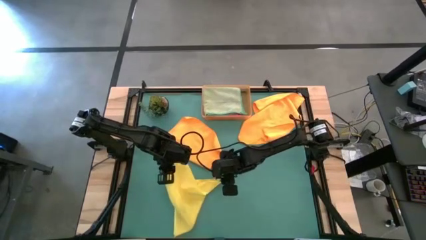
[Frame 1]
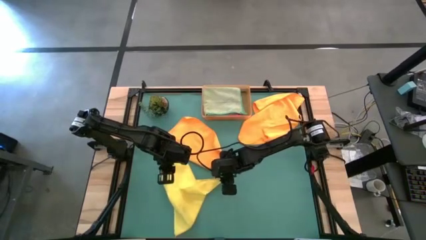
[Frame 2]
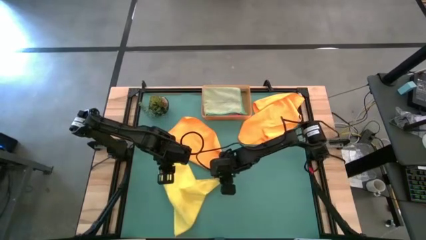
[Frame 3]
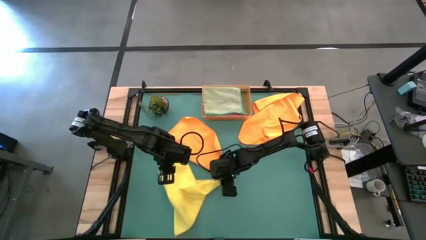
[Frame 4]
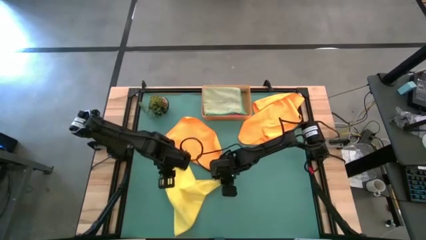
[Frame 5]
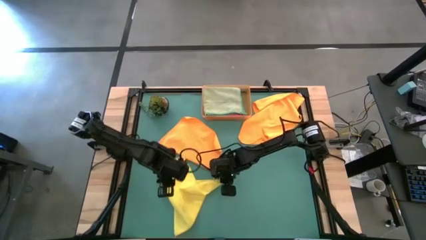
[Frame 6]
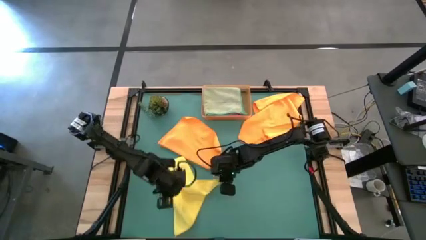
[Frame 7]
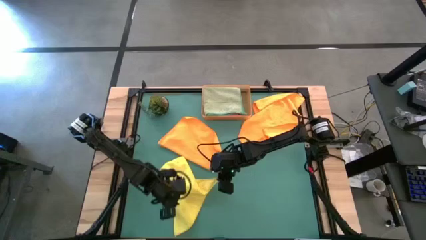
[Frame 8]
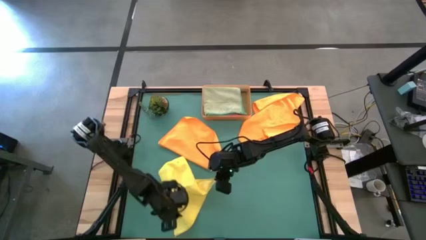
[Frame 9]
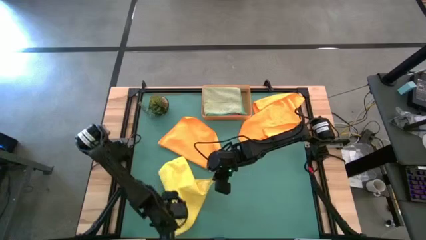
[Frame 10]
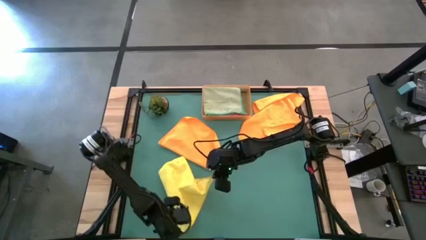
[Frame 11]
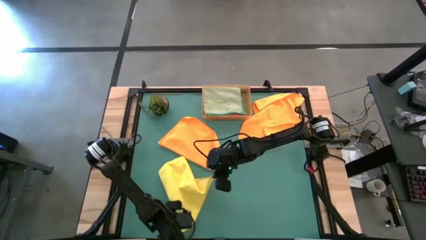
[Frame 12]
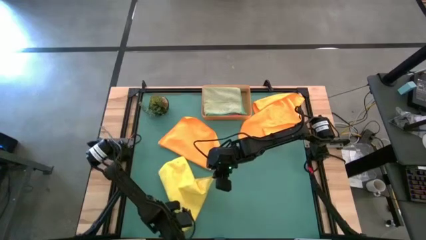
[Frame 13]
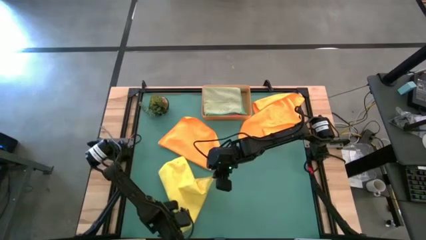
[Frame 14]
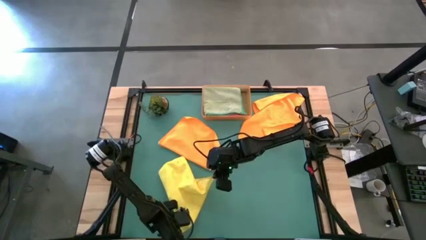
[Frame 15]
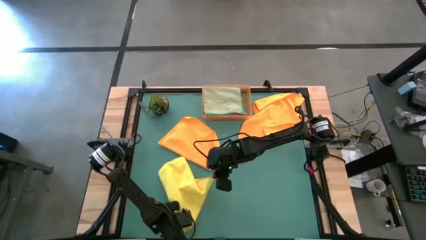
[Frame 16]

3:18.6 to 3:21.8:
Task: Fold microfiber towels
Fold the yellow microfiber towel

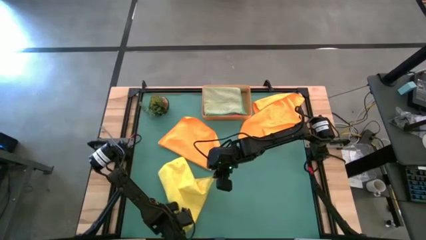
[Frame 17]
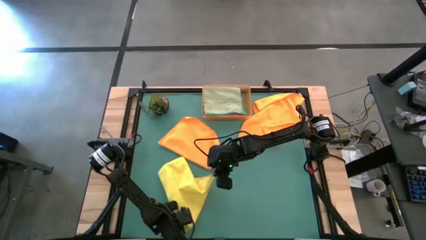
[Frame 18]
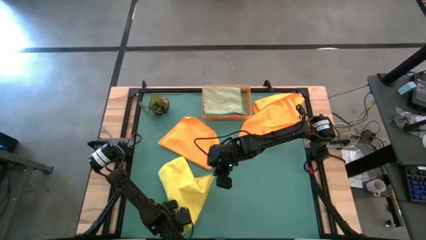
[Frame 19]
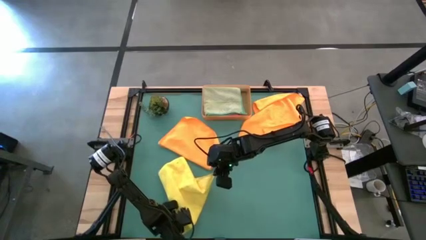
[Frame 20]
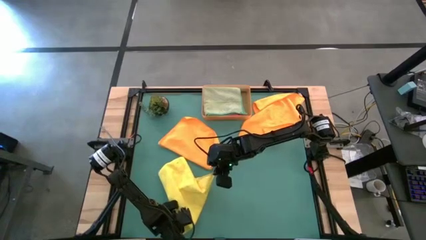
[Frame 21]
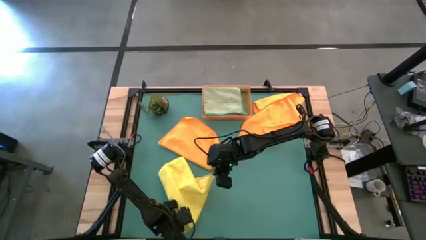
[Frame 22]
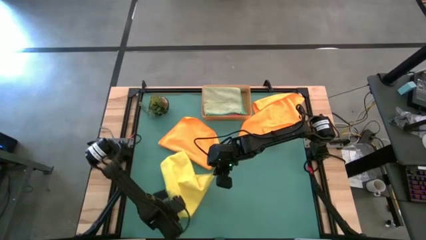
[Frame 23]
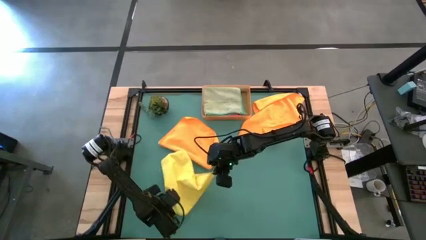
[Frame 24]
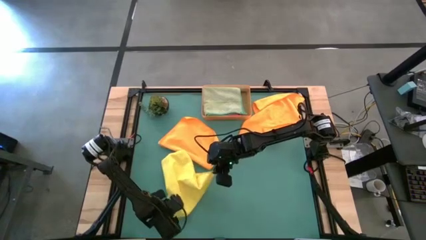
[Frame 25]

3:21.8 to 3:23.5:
Fold the yellow microfiber towel

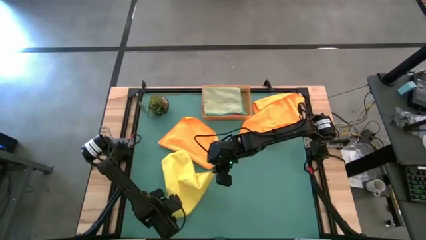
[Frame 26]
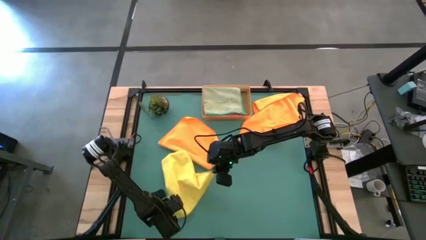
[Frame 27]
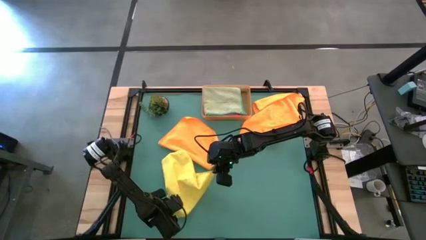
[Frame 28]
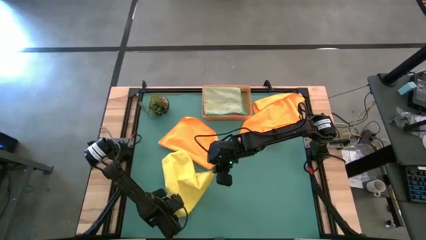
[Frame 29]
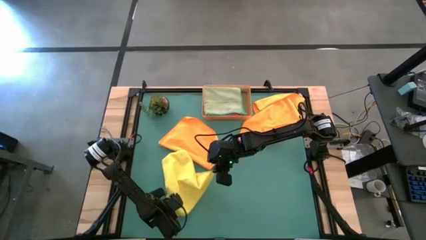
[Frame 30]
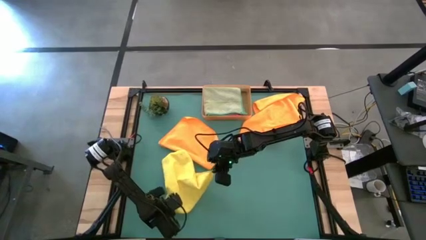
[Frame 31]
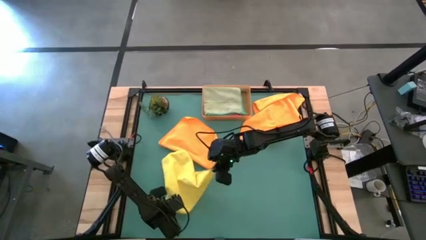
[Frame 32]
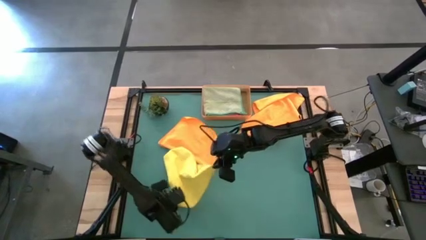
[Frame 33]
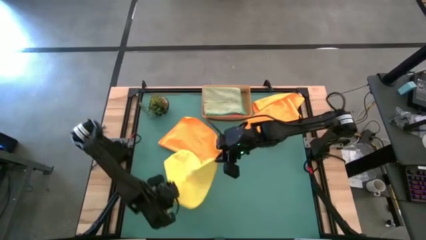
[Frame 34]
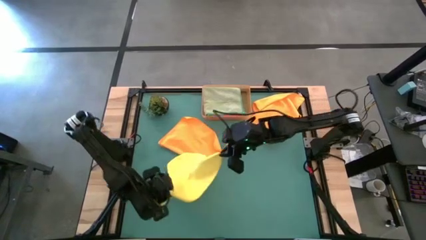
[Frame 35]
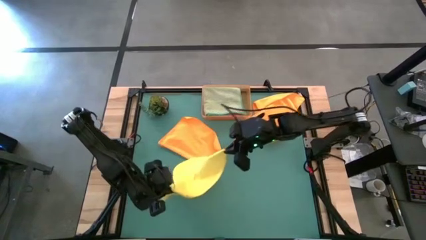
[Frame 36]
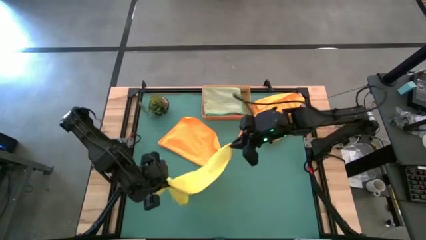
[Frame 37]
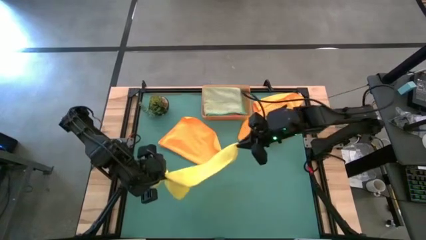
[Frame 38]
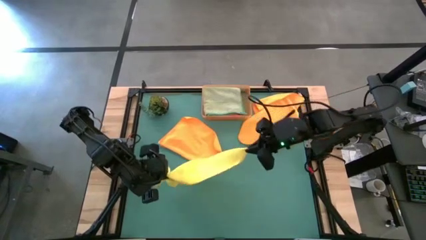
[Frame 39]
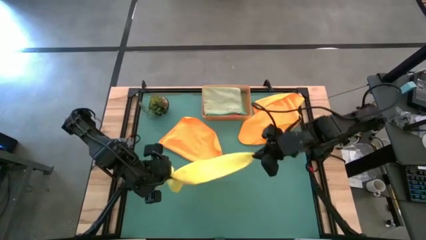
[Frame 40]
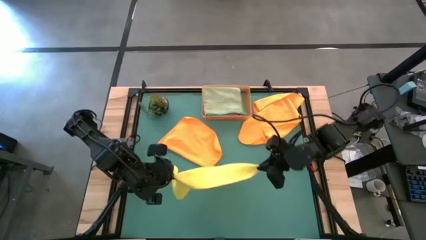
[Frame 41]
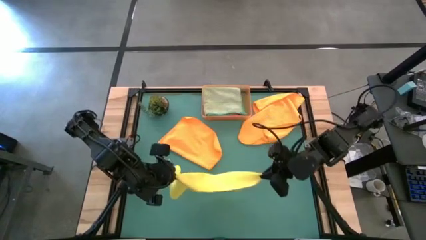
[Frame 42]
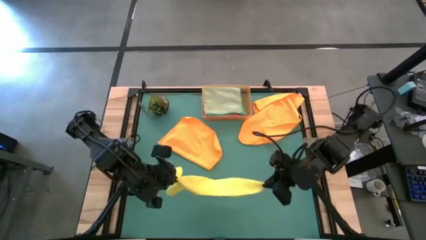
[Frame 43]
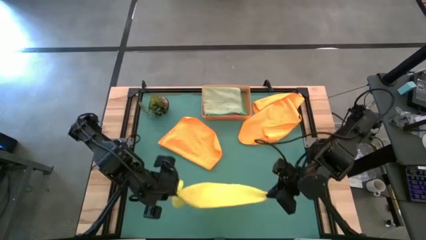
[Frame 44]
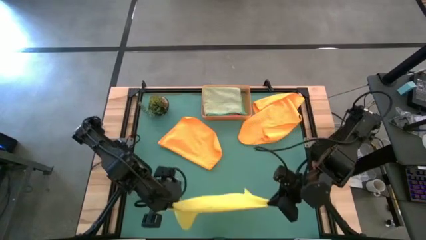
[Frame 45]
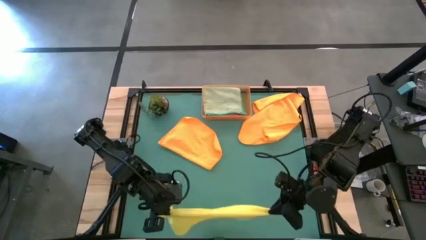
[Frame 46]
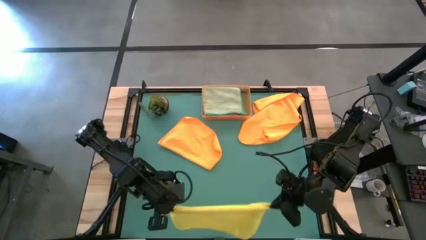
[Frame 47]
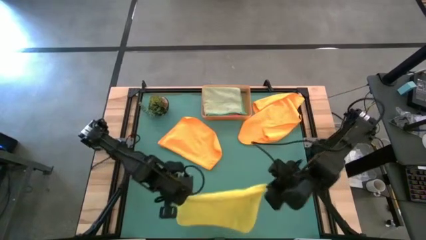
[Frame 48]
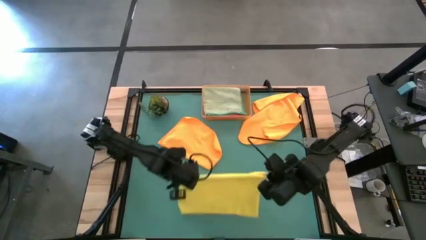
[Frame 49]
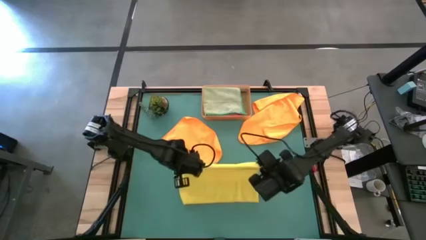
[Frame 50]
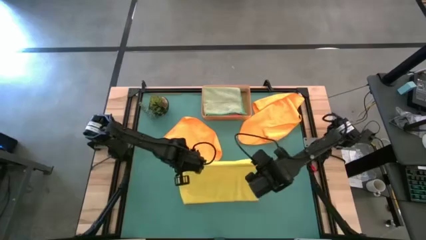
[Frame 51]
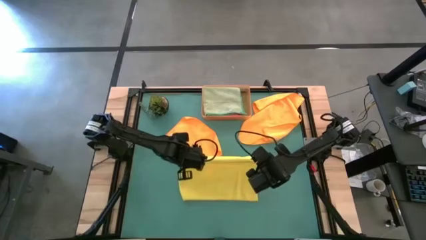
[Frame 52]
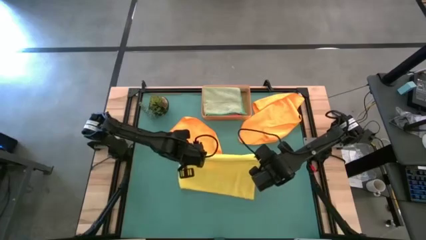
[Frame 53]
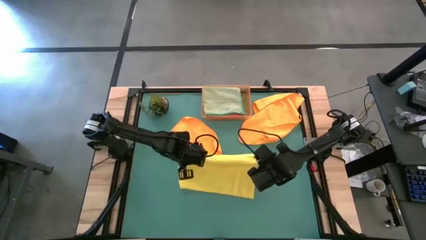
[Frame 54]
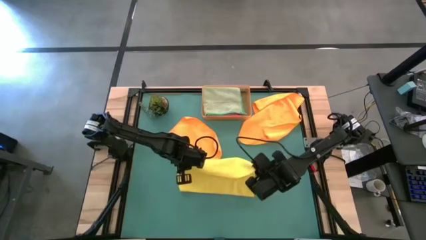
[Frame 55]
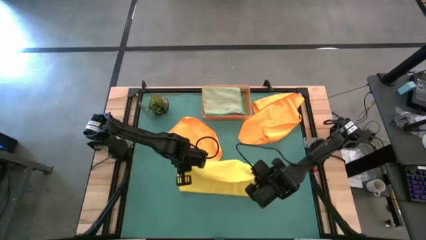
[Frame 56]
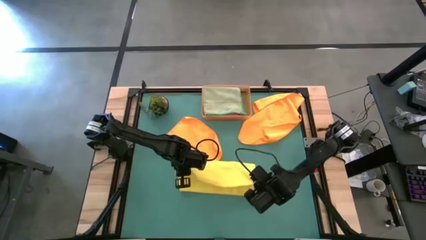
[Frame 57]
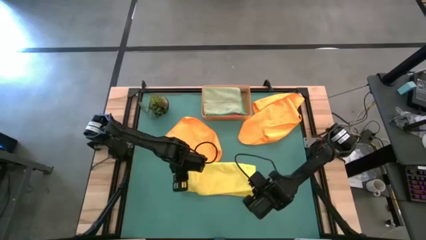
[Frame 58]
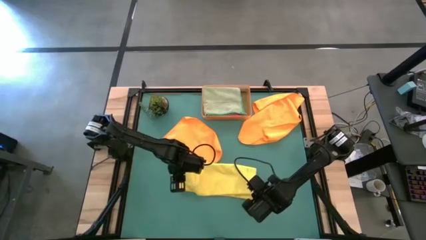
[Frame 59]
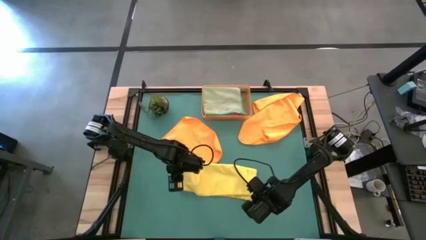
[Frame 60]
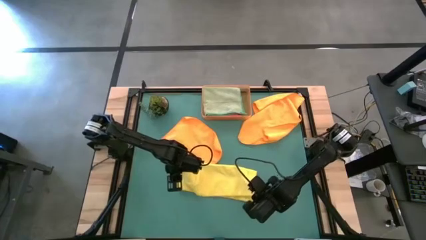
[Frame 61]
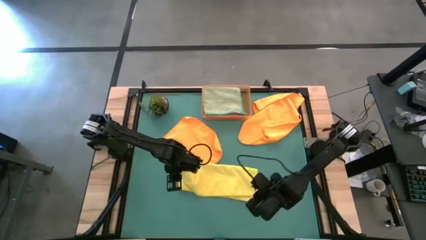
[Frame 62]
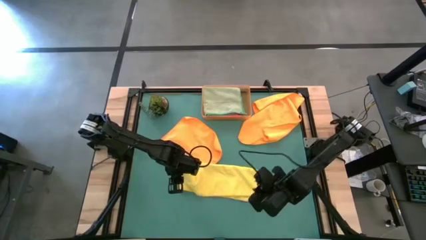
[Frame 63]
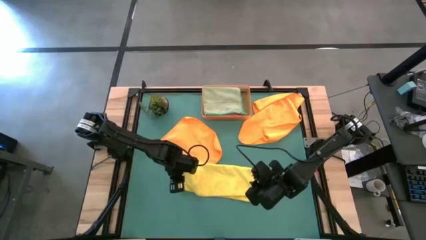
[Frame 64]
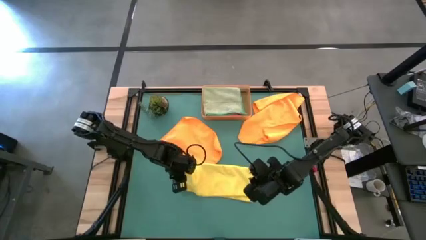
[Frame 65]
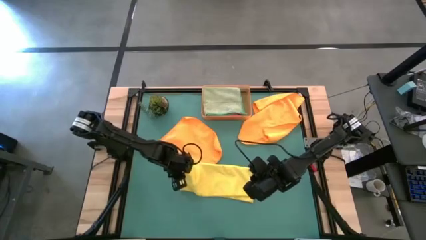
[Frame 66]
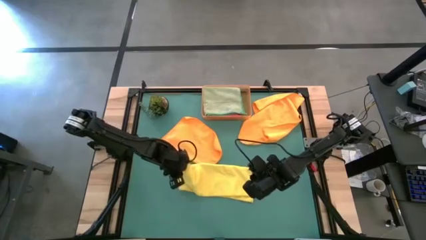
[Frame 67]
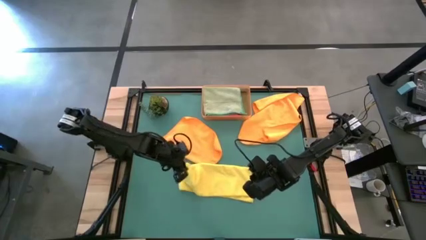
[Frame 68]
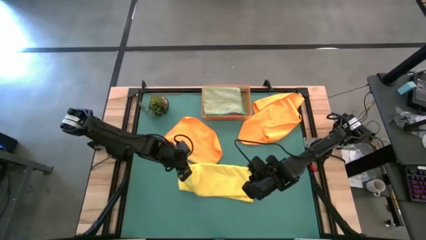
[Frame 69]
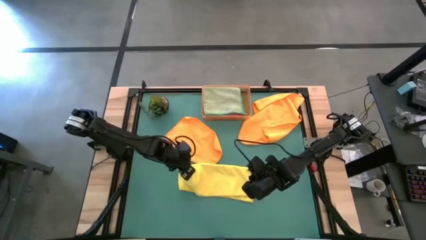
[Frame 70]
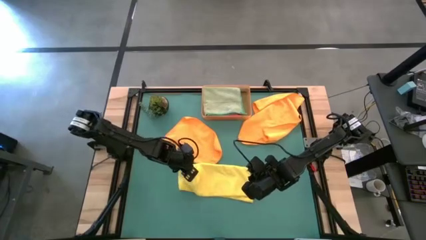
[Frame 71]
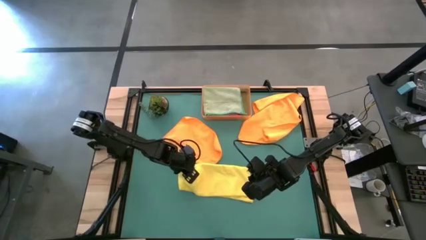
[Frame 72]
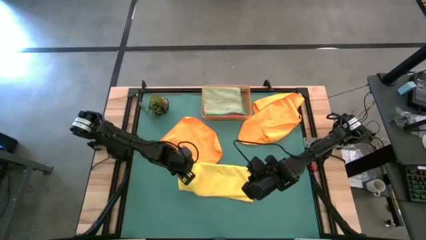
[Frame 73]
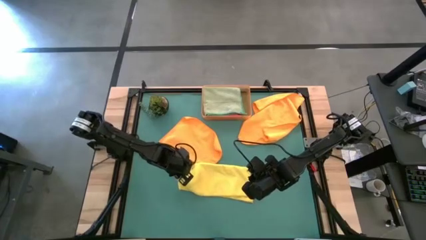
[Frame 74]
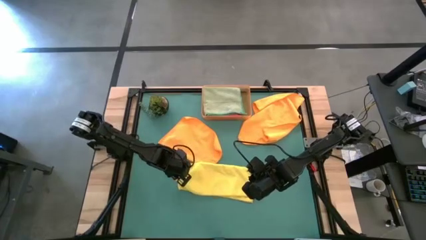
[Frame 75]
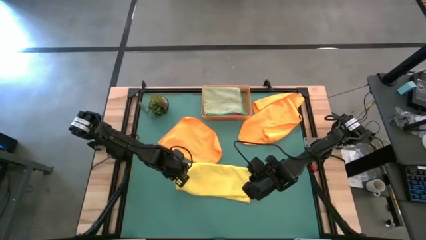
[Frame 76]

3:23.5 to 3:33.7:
Fold the yellow microfiber towel
